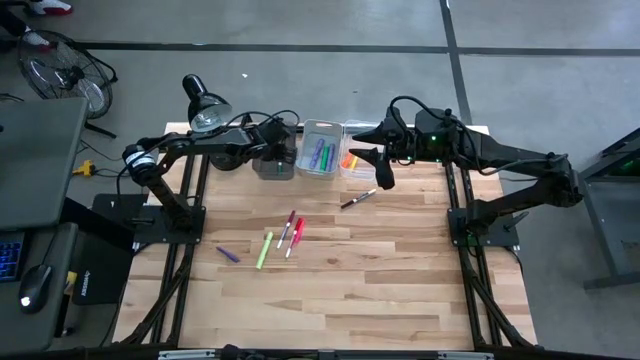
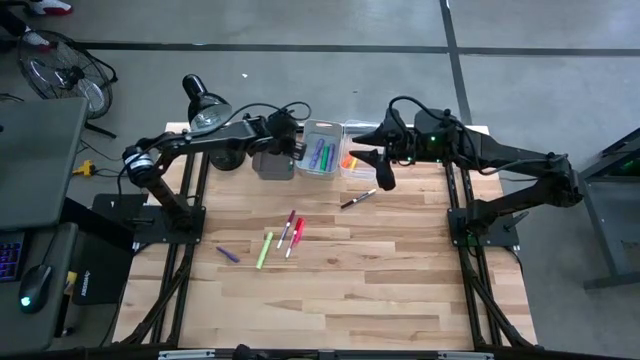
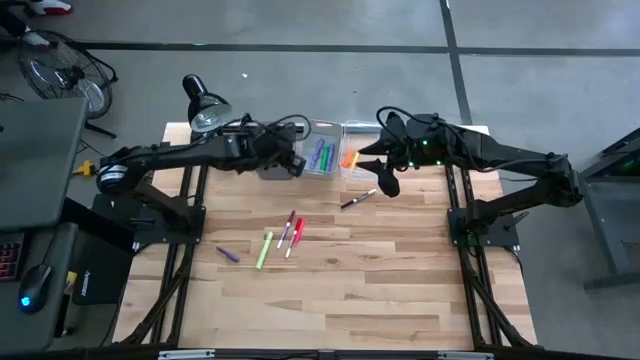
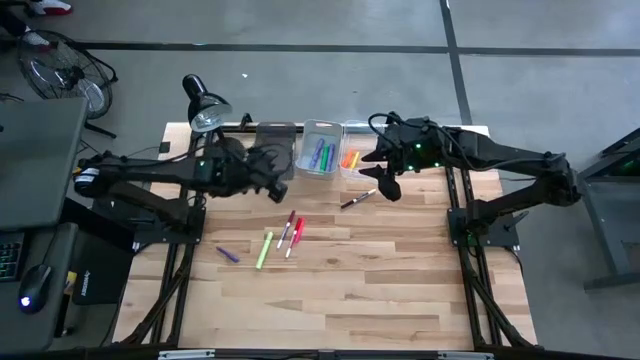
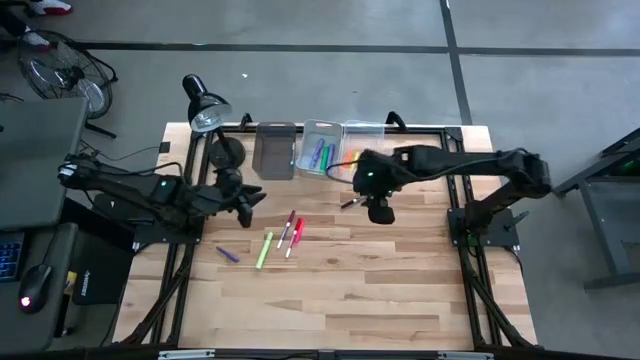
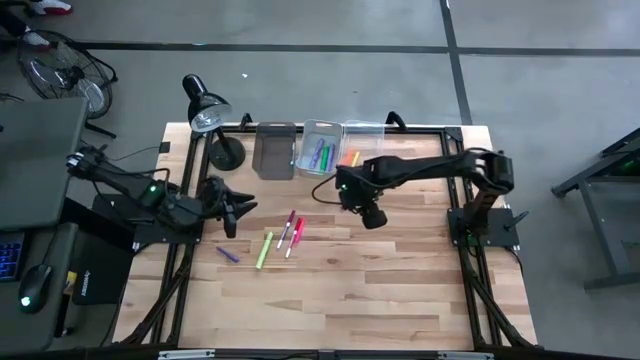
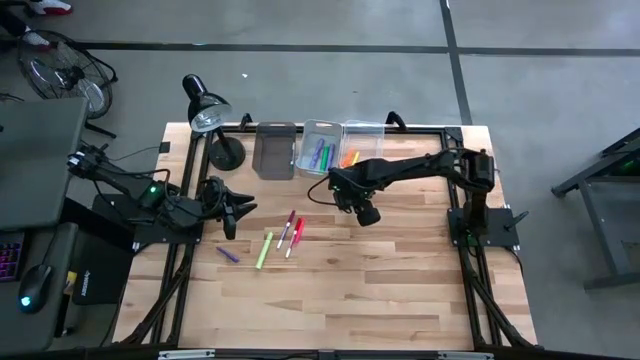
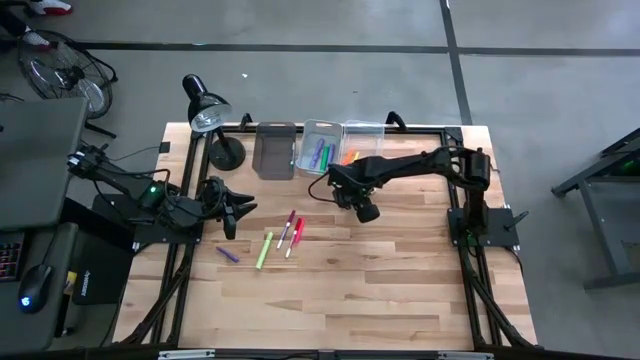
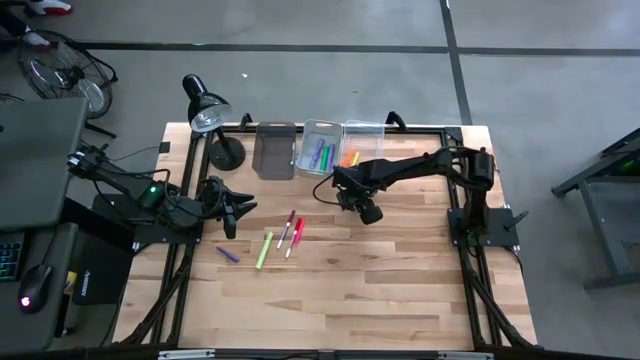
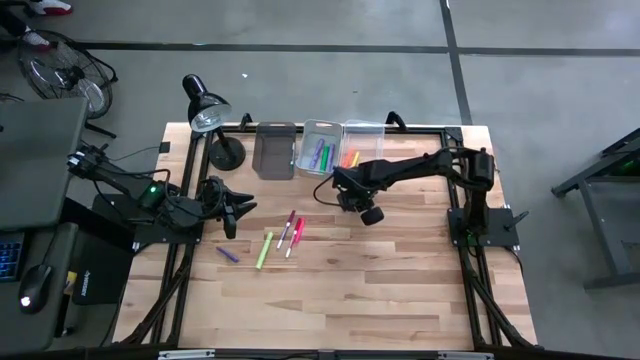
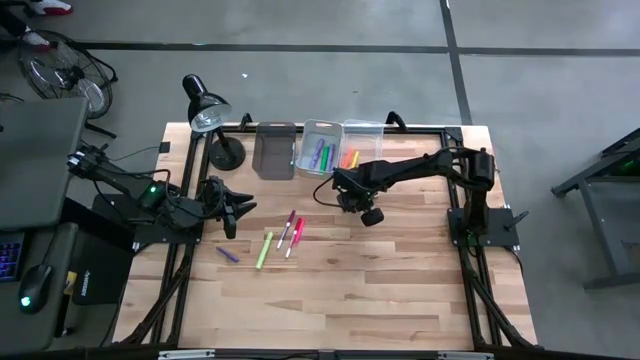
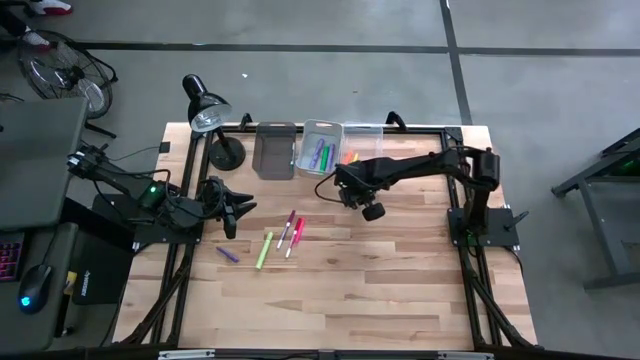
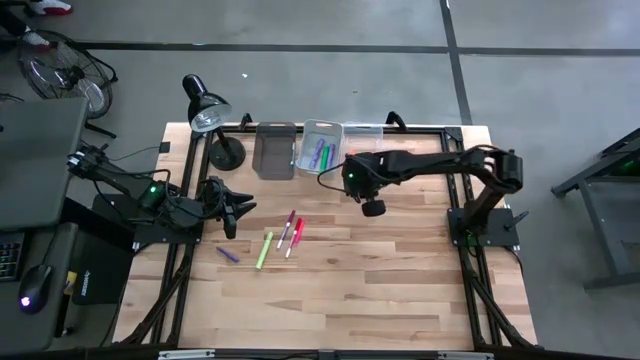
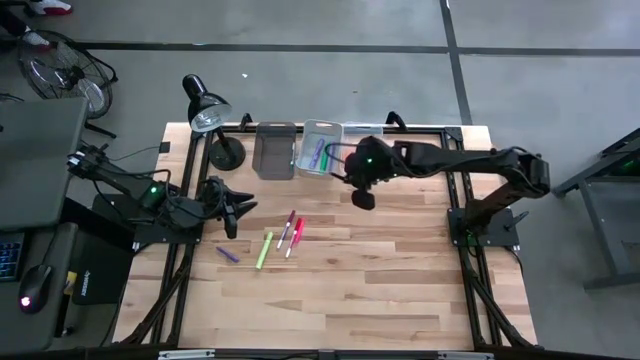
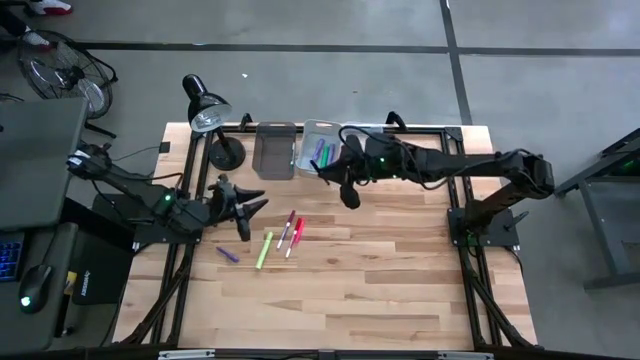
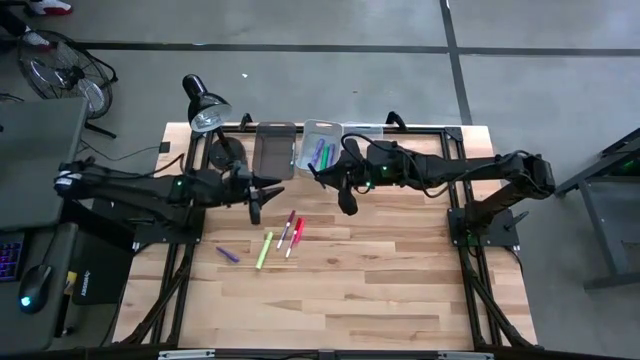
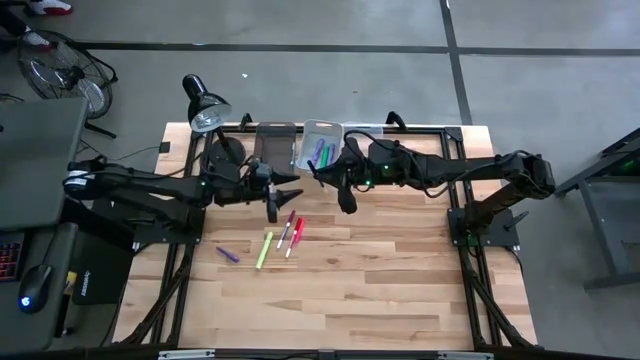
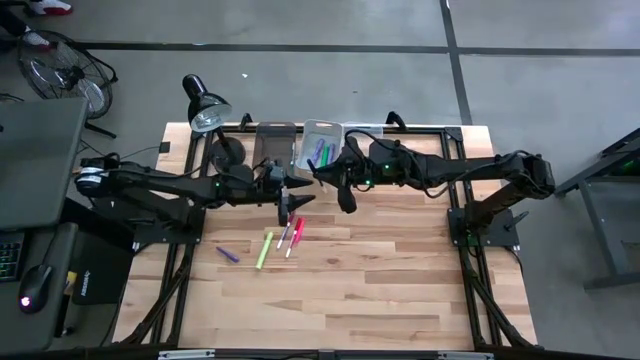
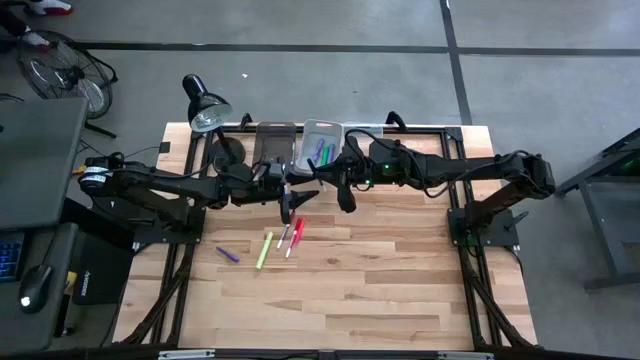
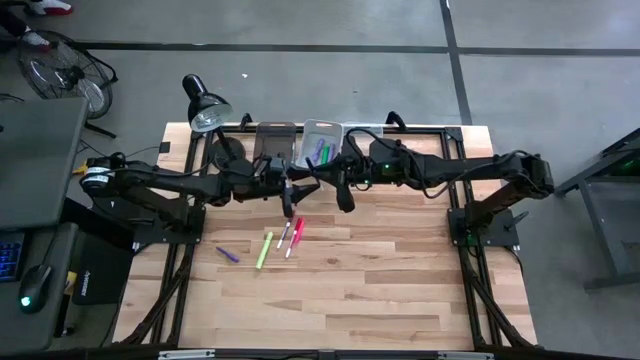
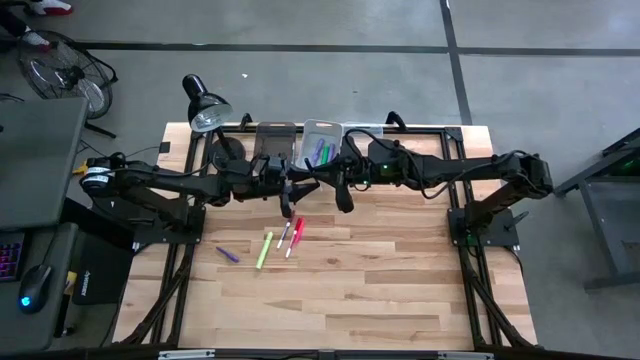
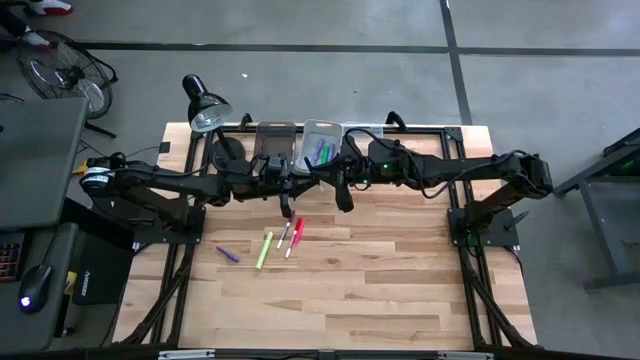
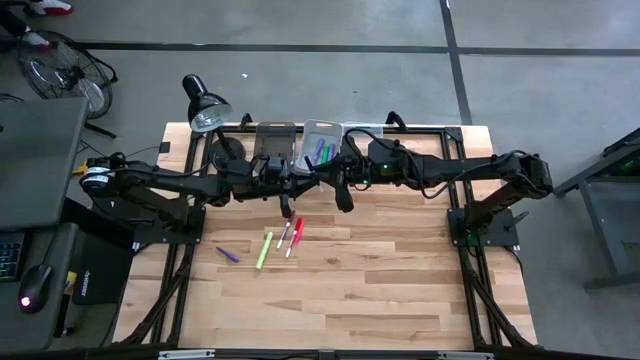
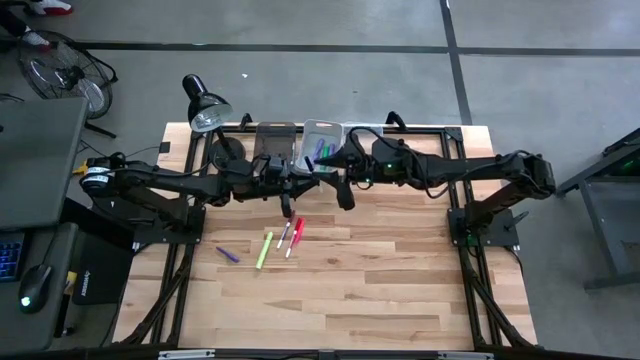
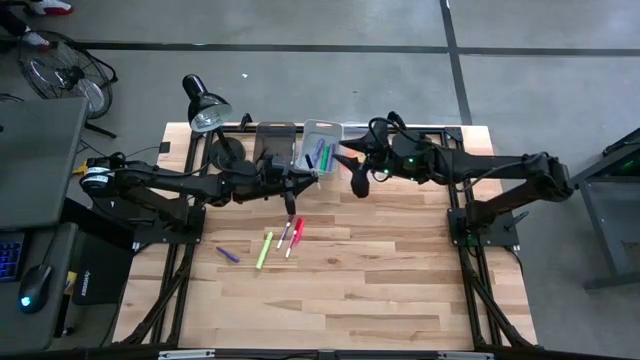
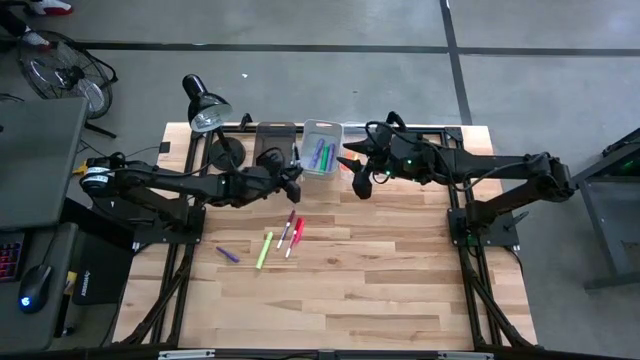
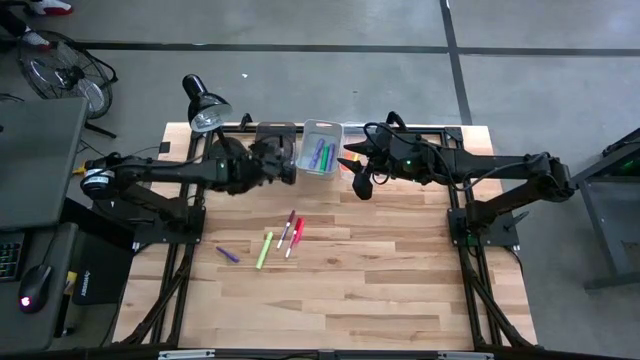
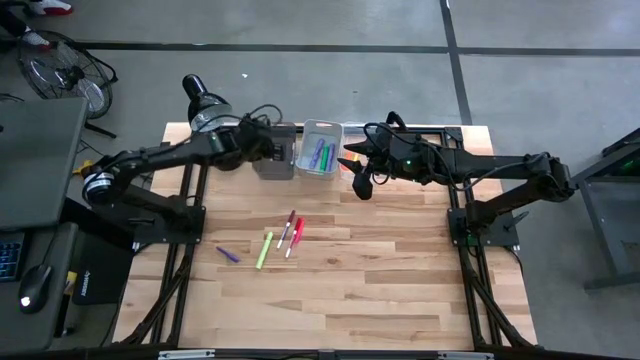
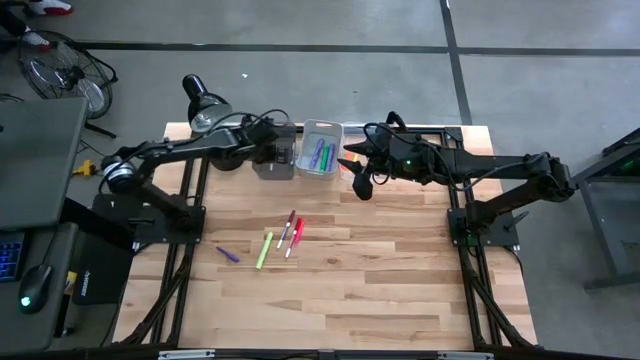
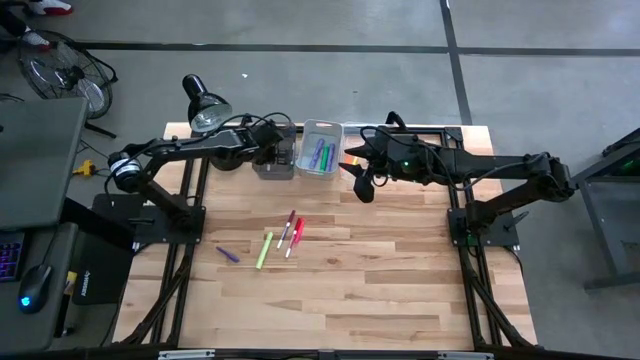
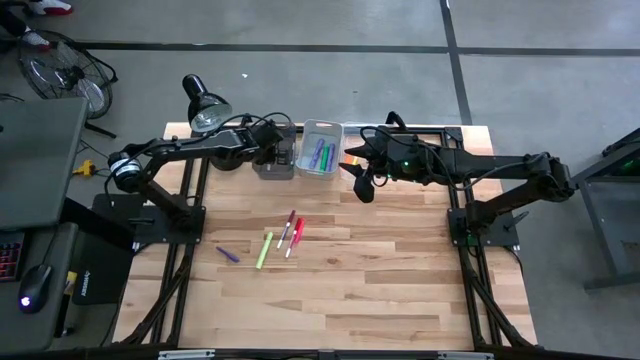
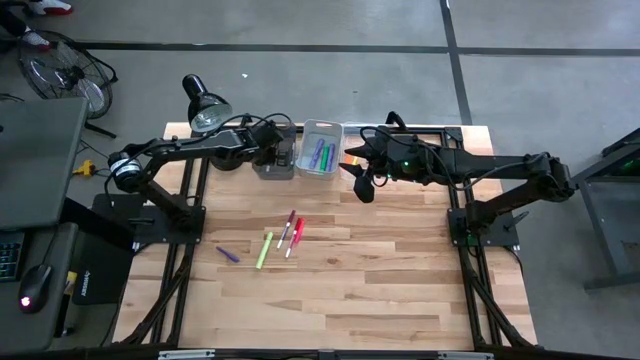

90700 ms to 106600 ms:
Task: Pick & Place Markers
Put the black marker into the black bin

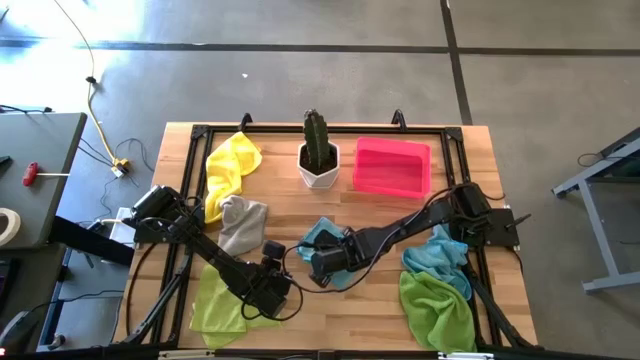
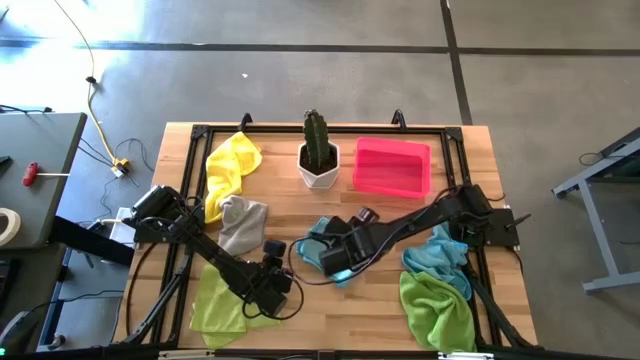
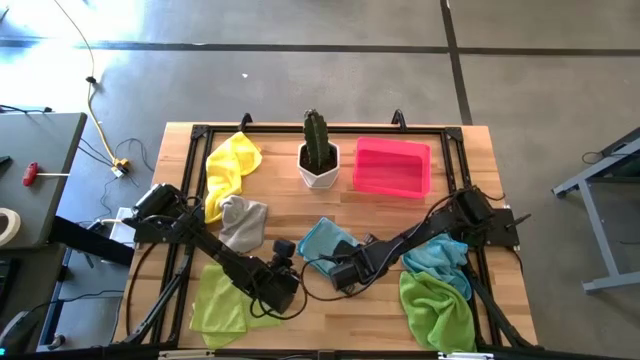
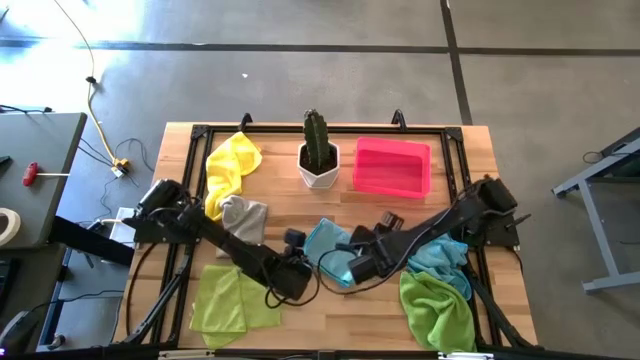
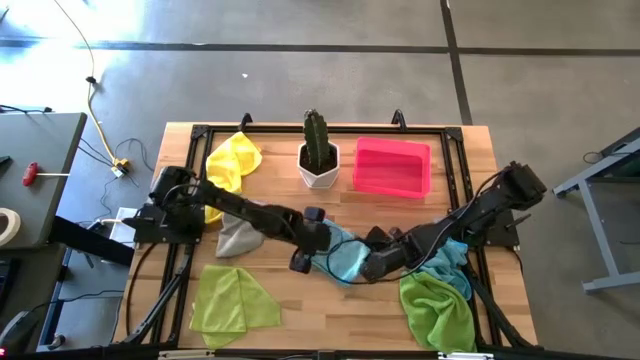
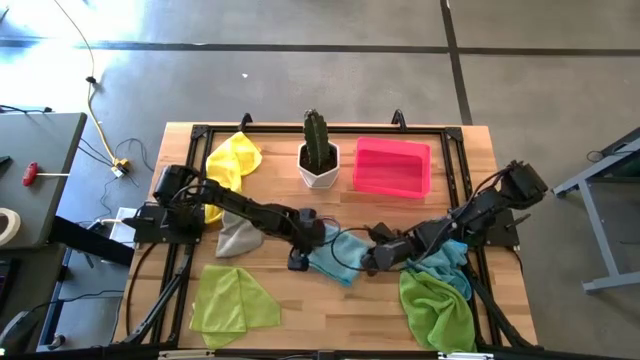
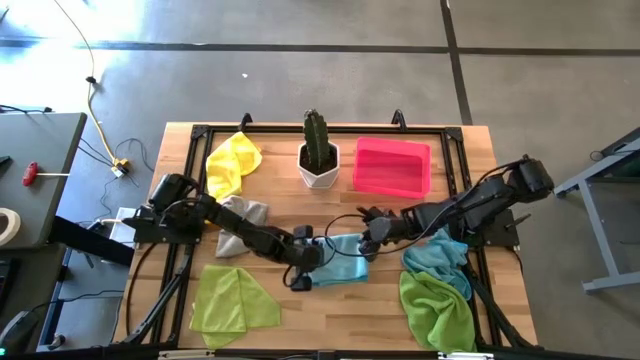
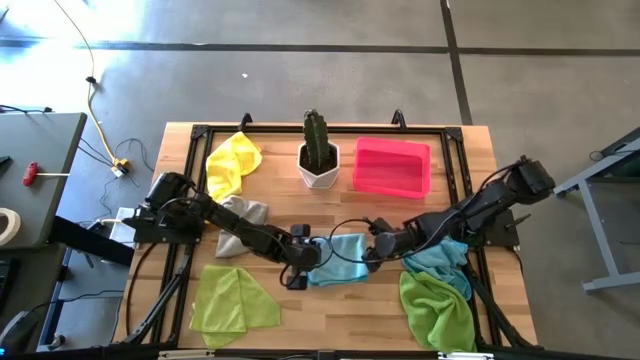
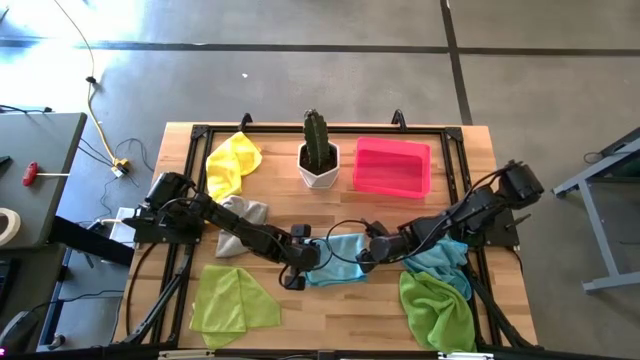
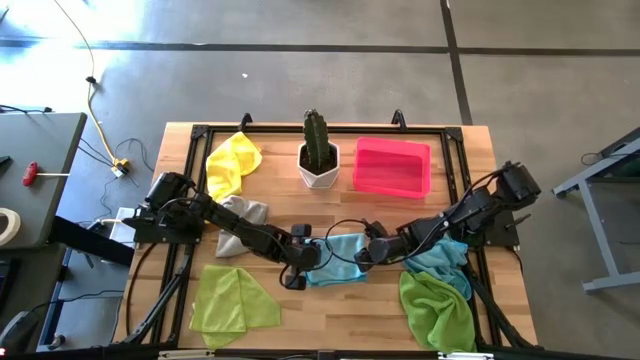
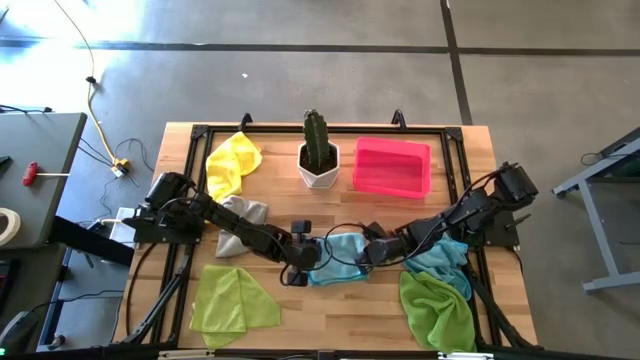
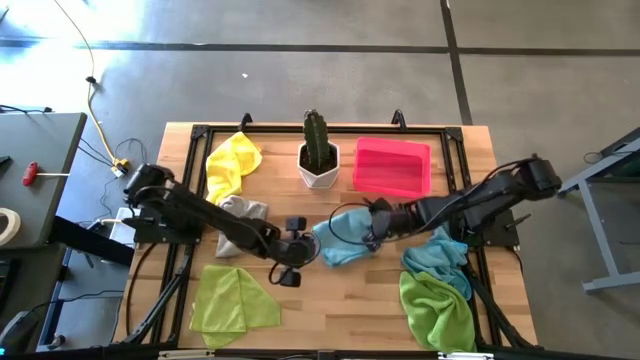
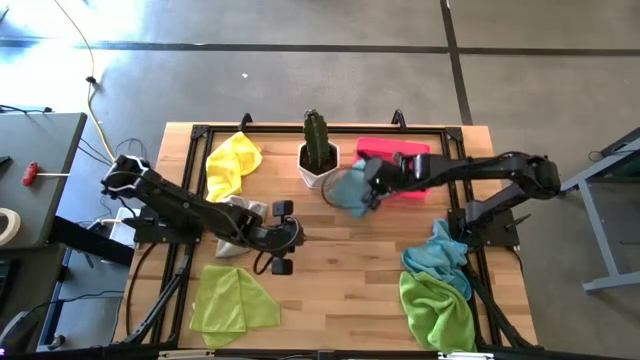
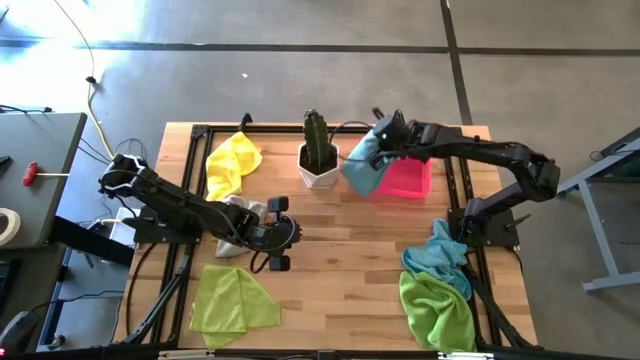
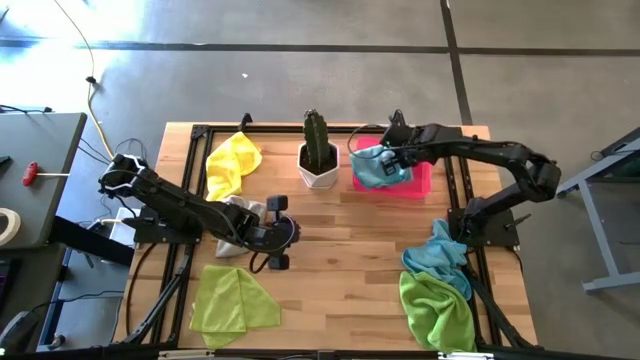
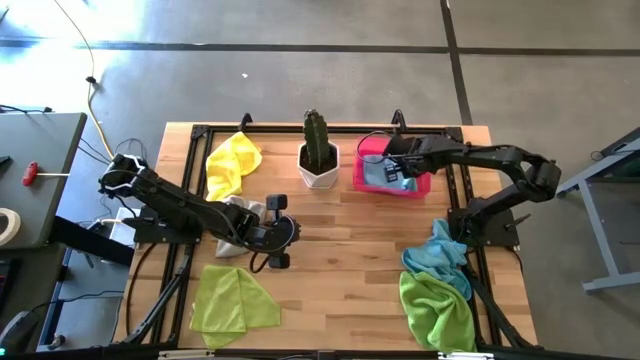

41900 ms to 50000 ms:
Task: Fold microfiber towels
Put the blue towel into the pink laundry bin
